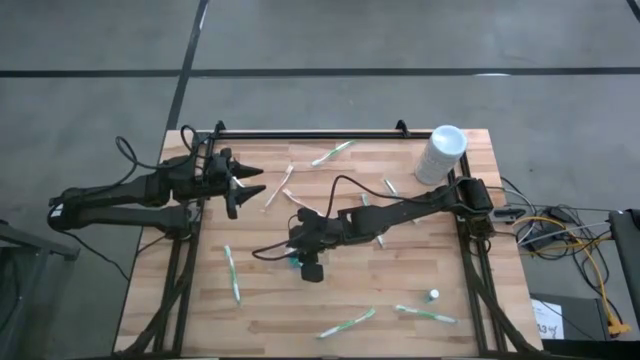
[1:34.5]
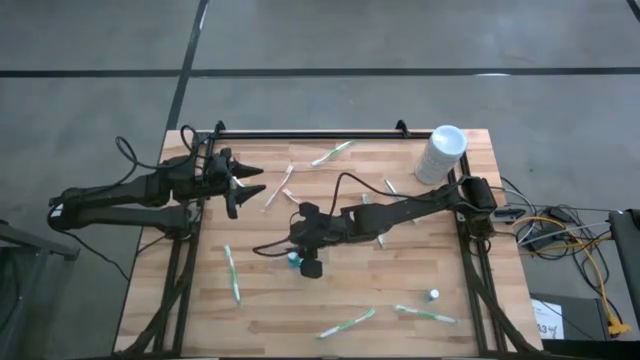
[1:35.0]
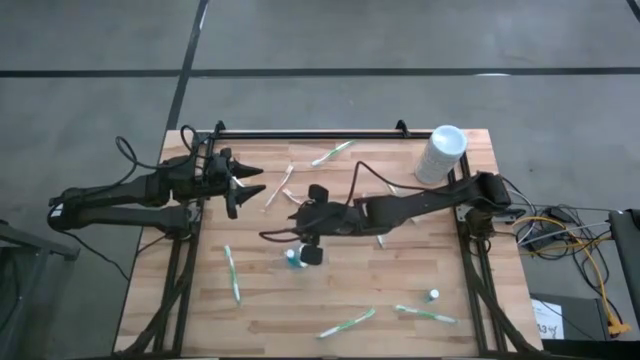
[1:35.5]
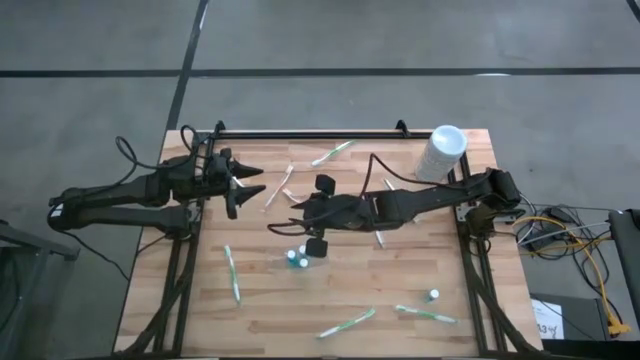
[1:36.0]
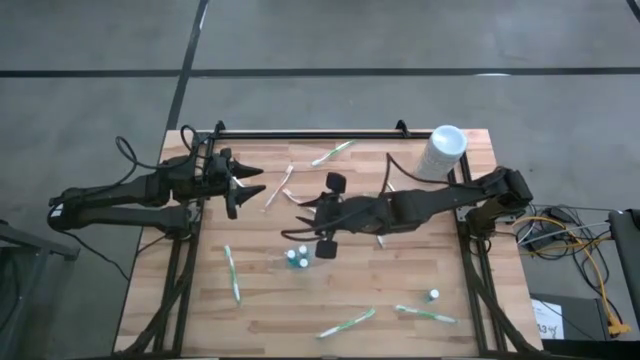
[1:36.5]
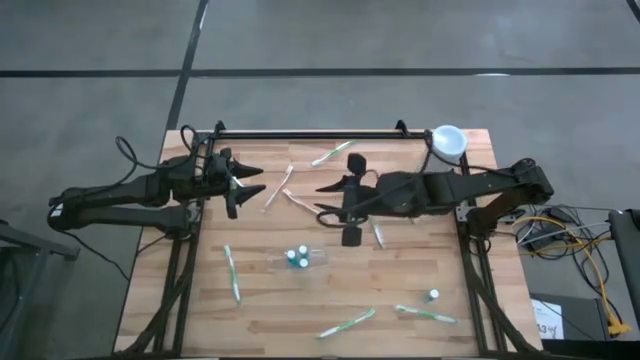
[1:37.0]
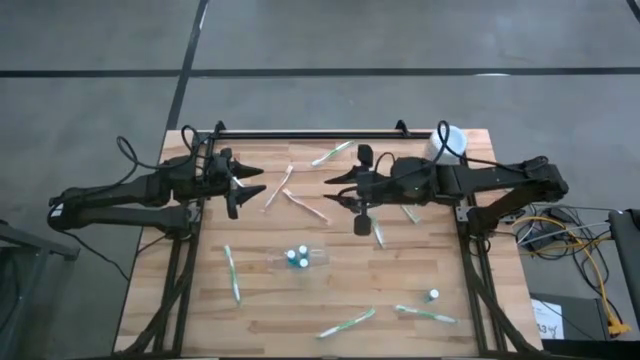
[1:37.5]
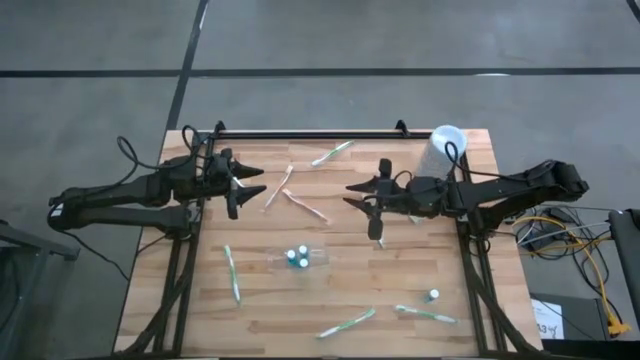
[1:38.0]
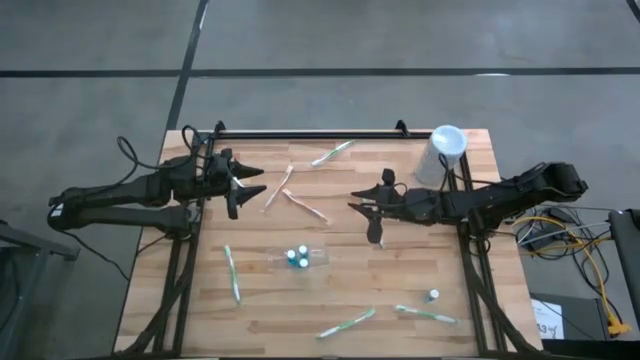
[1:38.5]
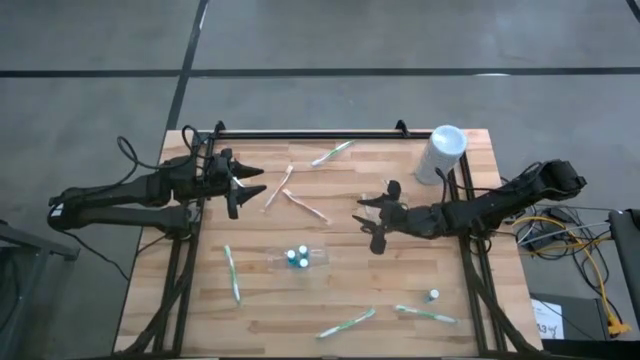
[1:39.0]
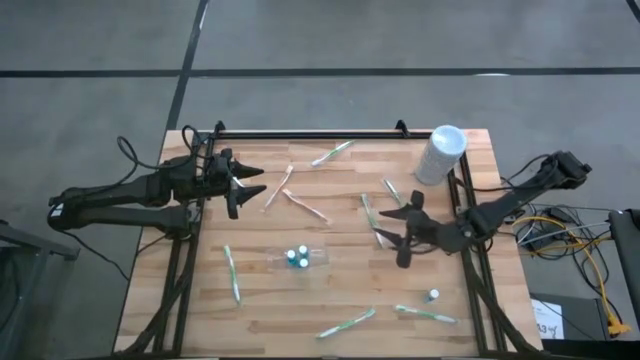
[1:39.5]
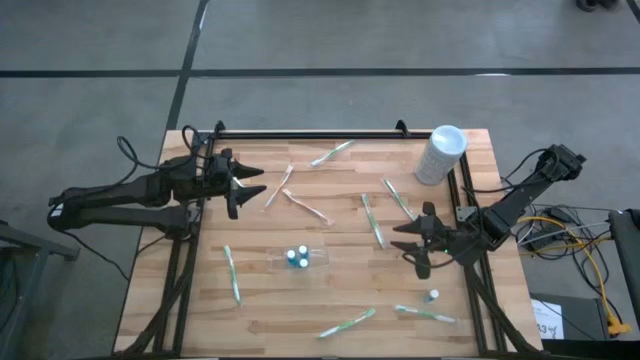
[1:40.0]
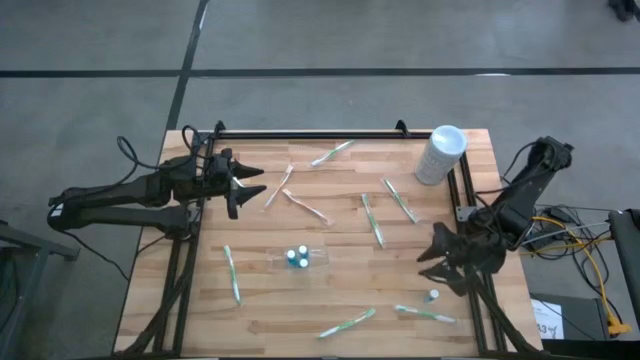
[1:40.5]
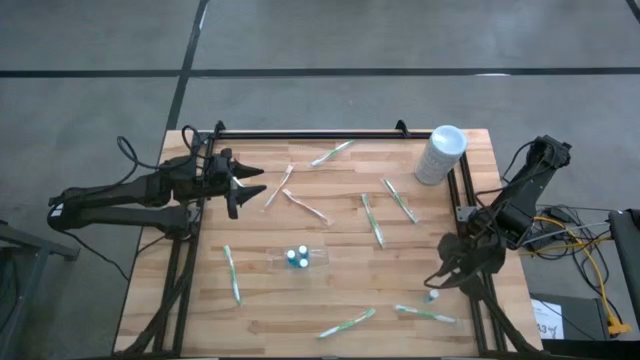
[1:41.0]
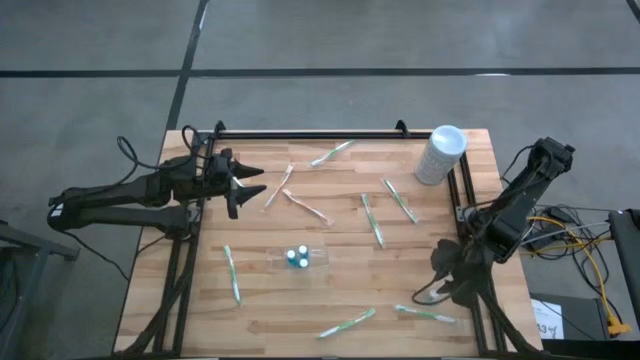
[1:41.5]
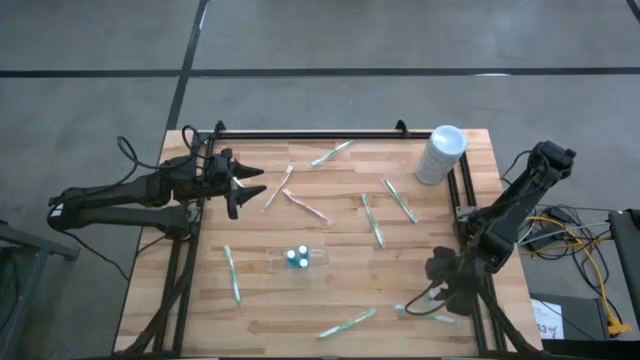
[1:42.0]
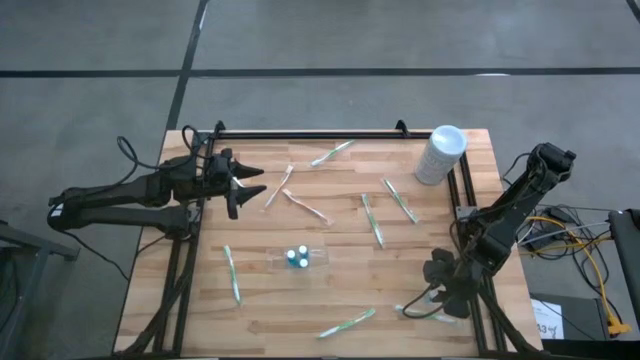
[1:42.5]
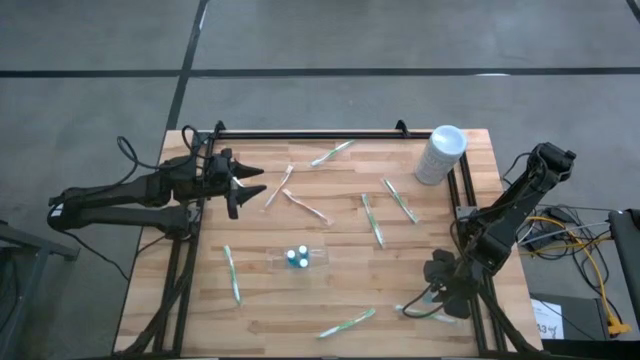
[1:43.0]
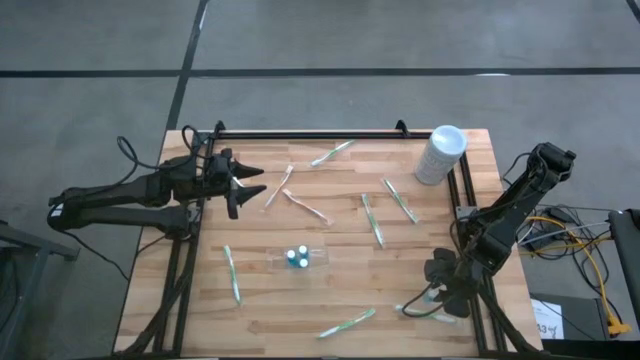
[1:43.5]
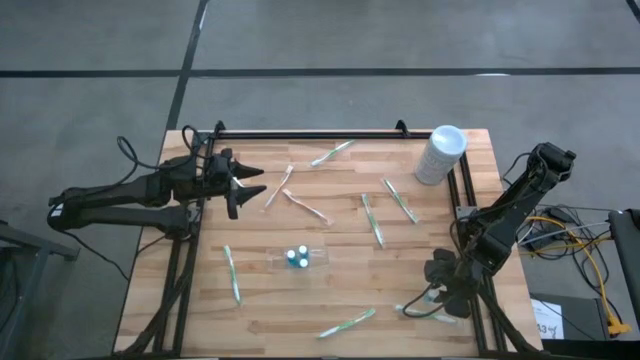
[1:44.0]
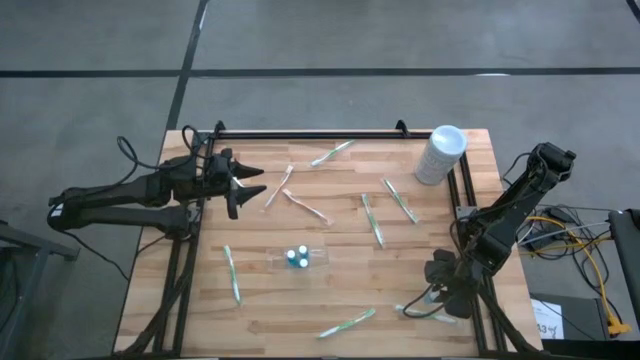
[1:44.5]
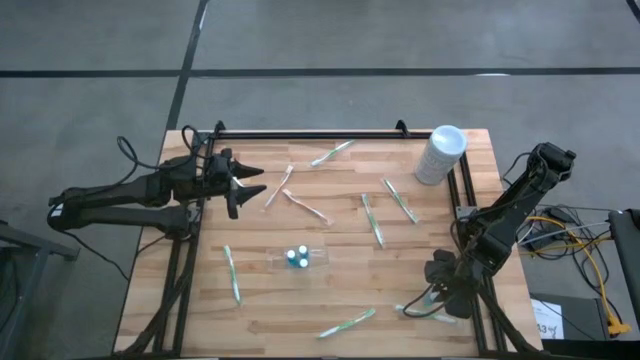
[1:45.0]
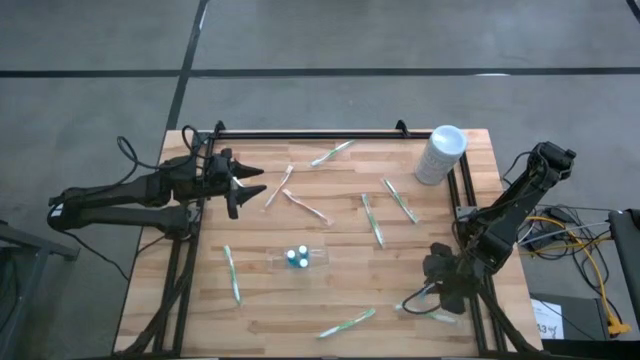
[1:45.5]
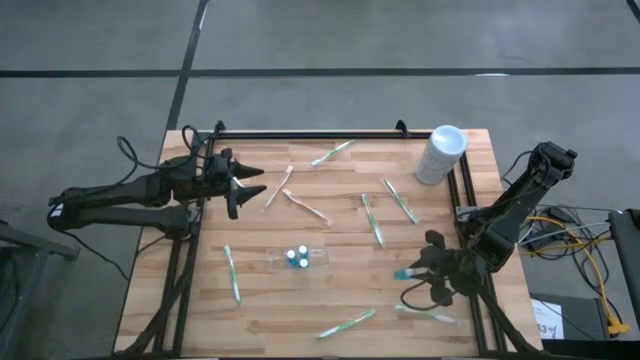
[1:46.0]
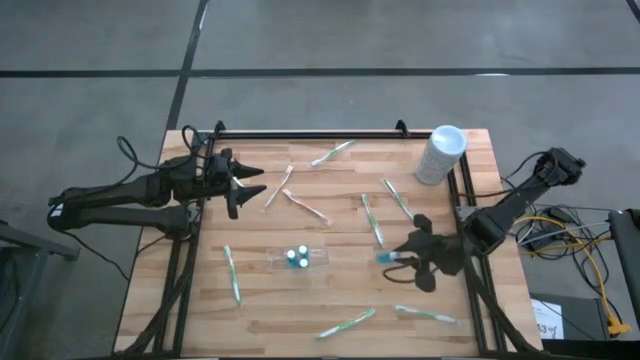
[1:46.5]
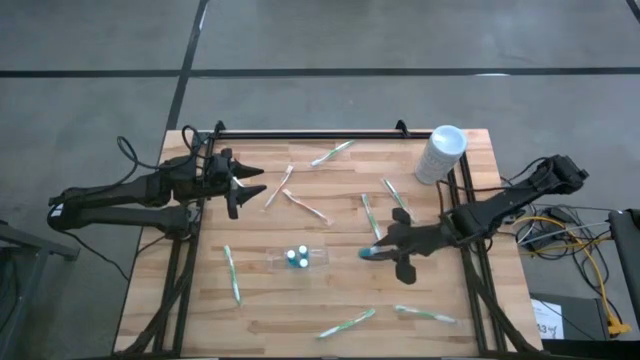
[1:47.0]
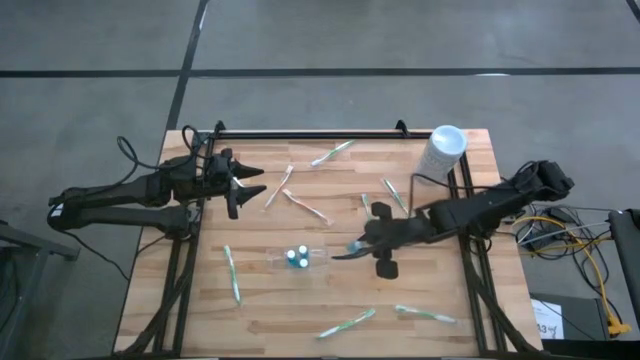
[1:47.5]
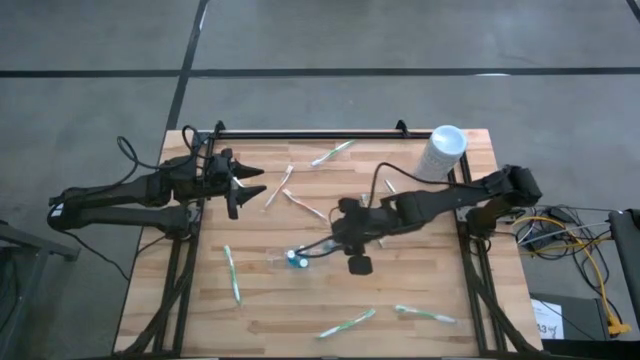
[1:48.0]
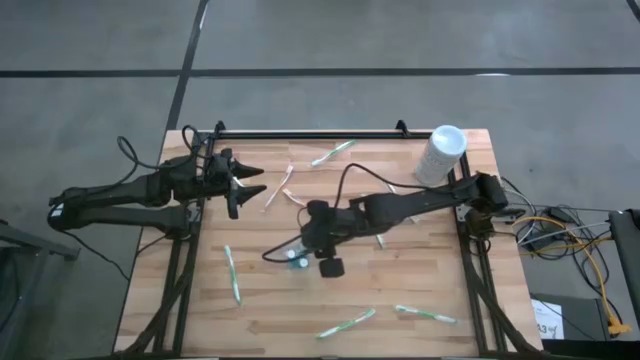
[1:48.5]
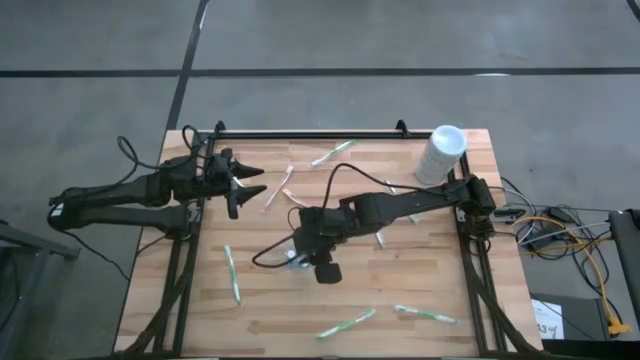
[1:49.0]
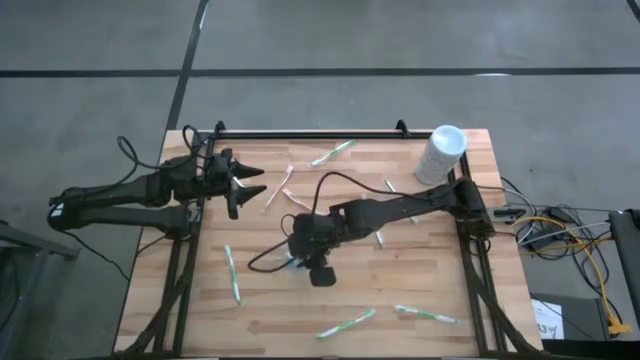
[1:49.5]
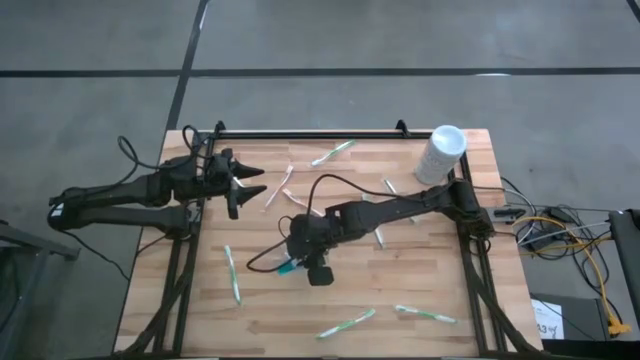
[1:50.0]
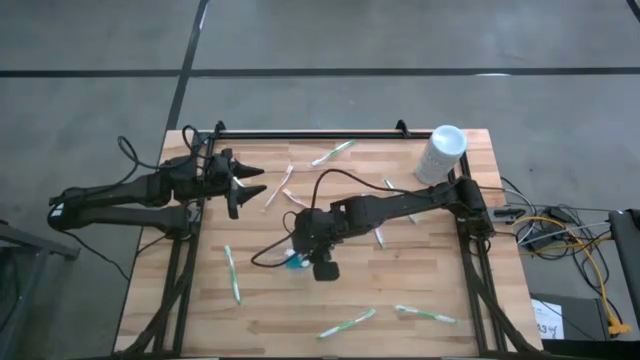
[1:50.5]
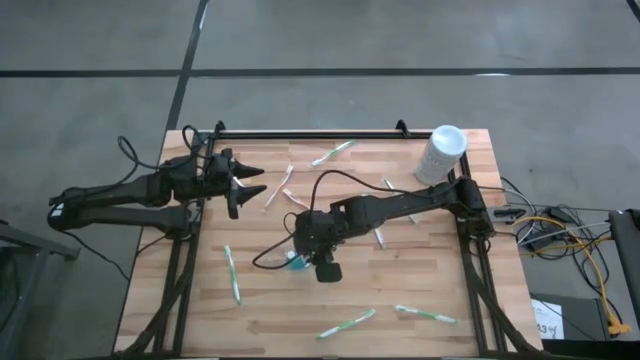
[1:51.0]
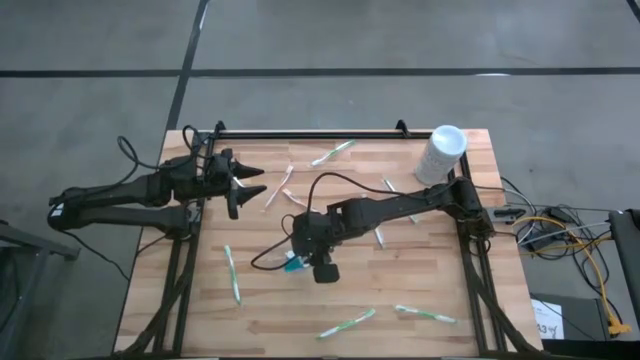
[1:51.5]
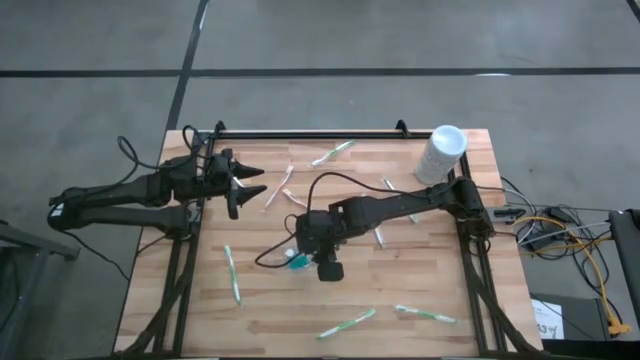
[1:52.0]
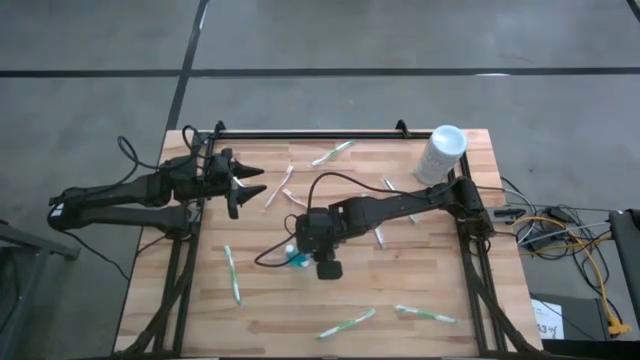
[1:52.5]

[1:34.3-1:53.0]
Task: Pick & Place toothbrushing station
Put the blue mouthwash into the transparent organizer

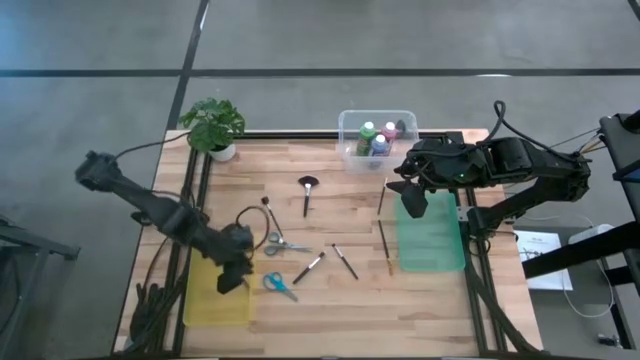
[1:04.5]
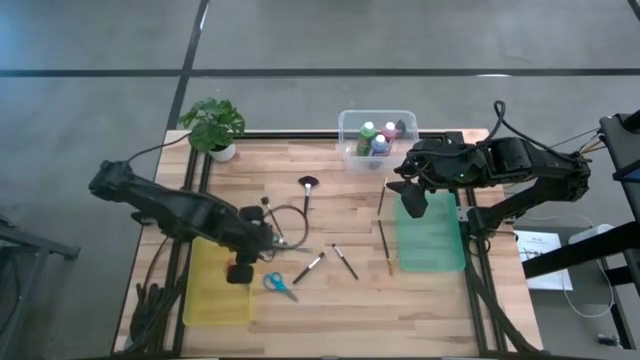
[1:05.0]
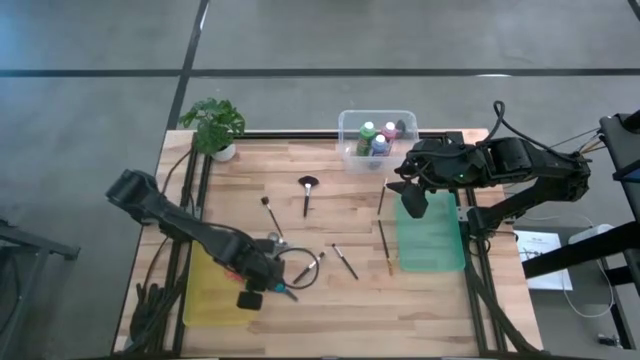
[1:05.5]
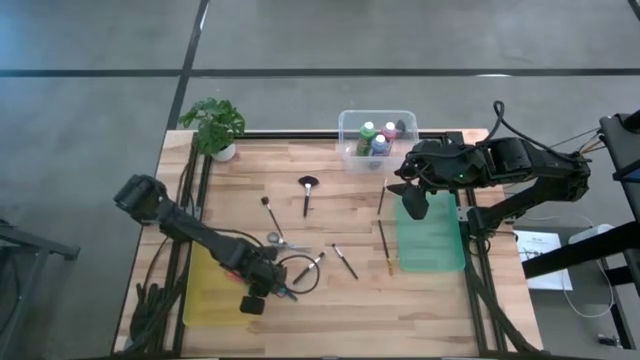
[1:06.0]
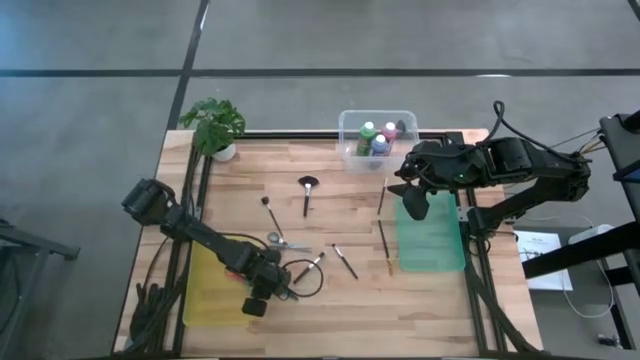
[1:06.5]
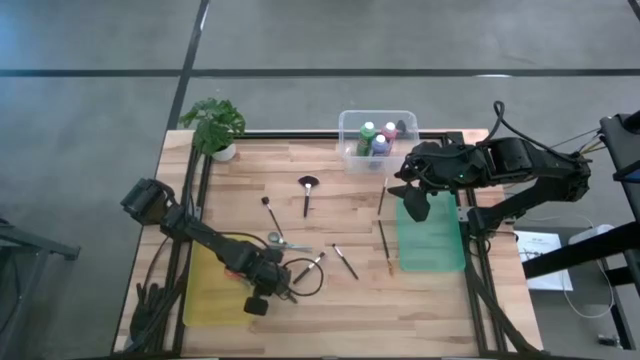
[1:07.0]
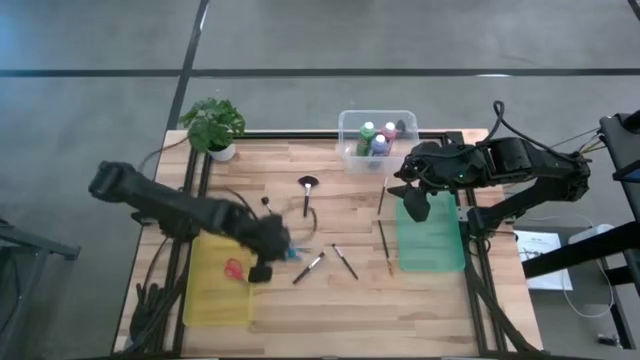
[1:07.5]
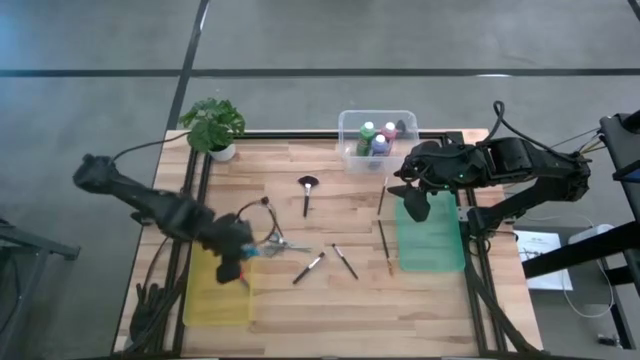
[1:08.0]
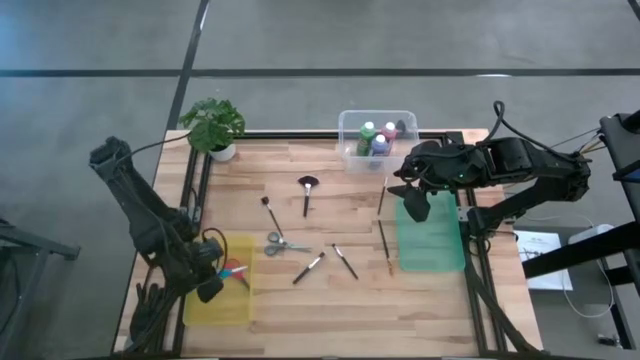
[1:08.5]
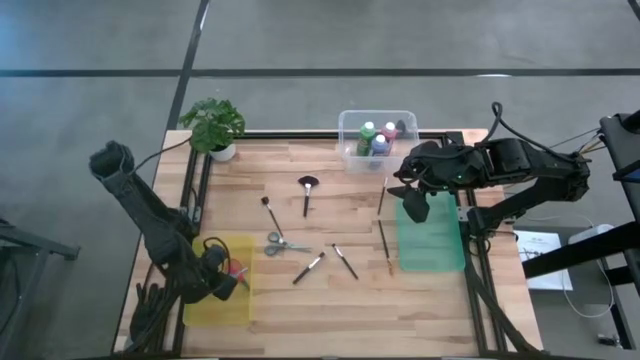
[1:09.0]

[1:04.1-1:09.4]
Task: Pick & Place Paint Supplies
Put the blue scissors into the yellow bin
